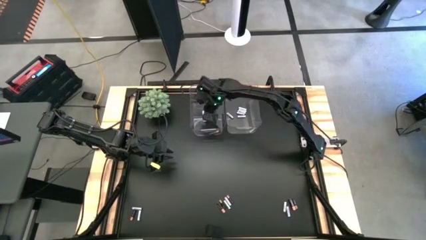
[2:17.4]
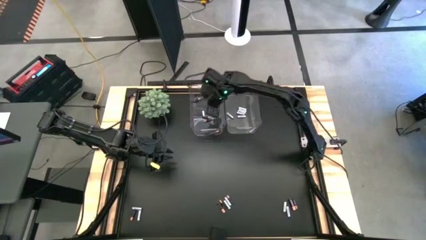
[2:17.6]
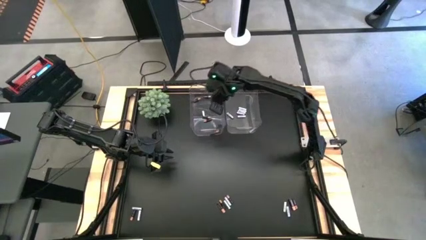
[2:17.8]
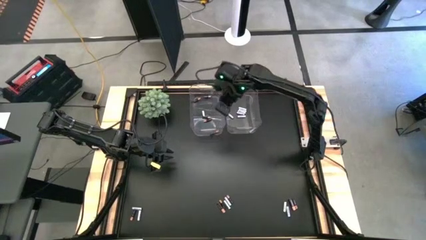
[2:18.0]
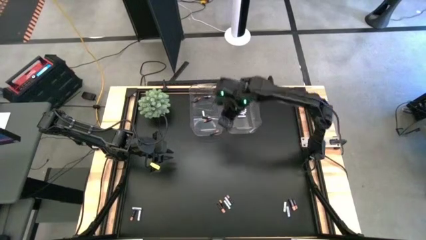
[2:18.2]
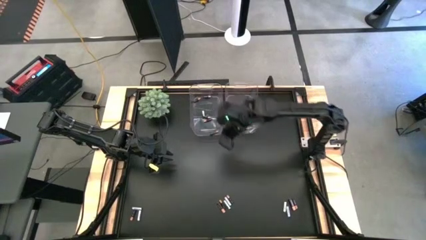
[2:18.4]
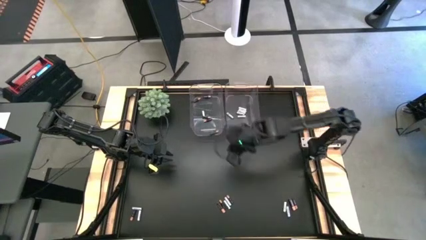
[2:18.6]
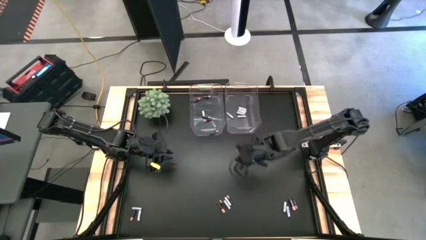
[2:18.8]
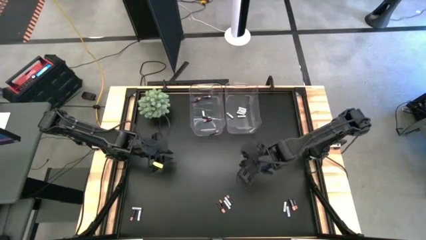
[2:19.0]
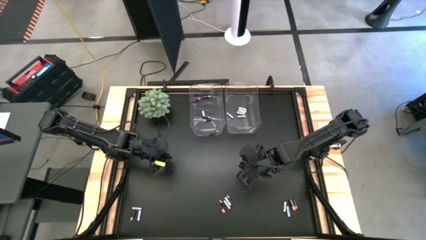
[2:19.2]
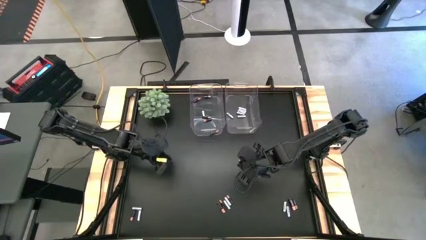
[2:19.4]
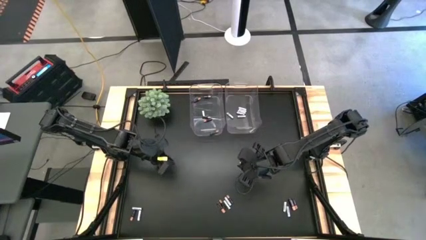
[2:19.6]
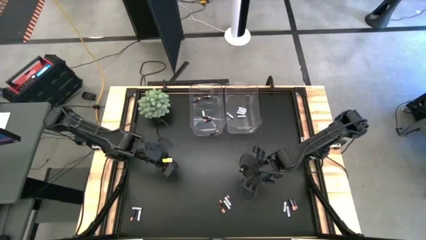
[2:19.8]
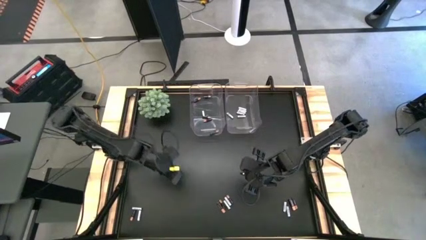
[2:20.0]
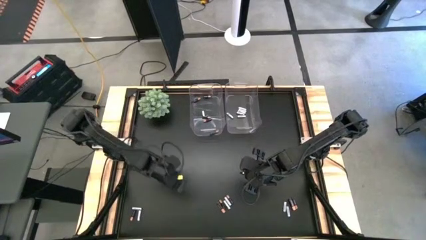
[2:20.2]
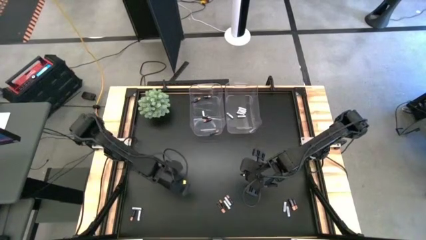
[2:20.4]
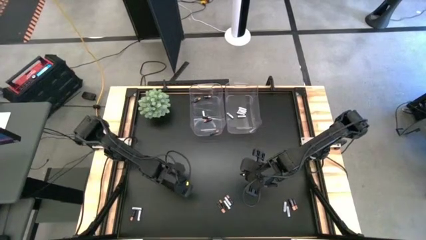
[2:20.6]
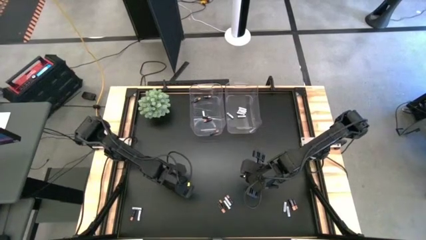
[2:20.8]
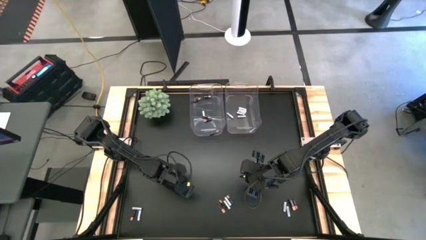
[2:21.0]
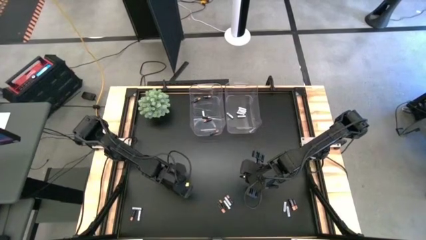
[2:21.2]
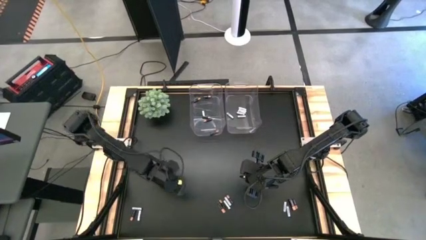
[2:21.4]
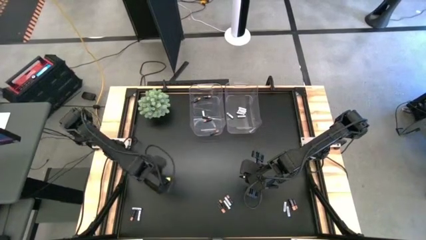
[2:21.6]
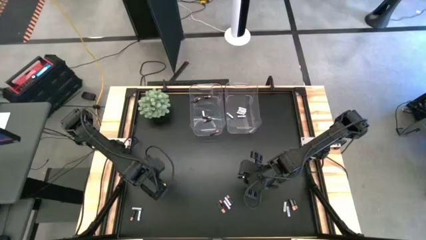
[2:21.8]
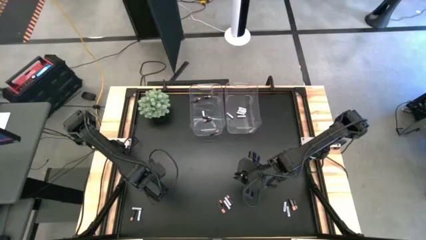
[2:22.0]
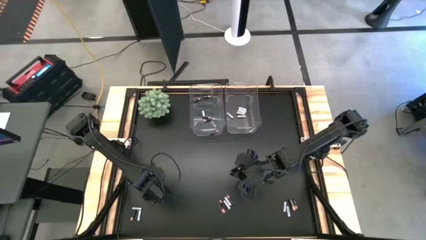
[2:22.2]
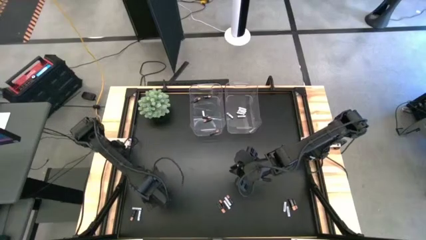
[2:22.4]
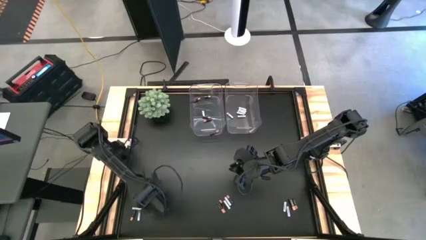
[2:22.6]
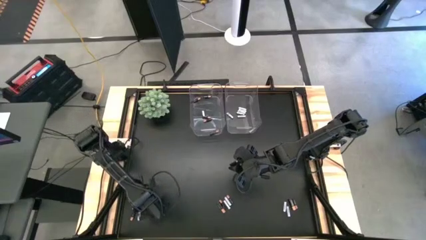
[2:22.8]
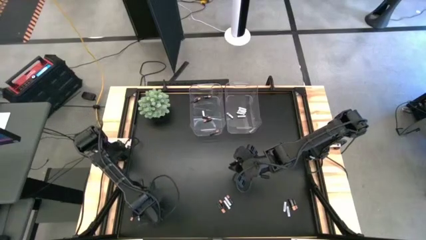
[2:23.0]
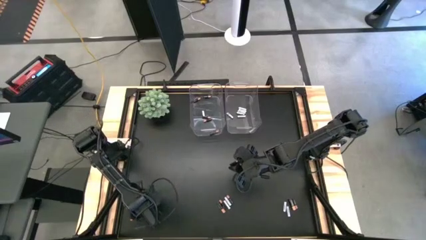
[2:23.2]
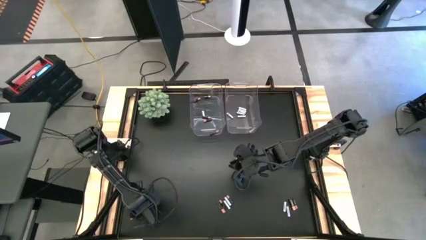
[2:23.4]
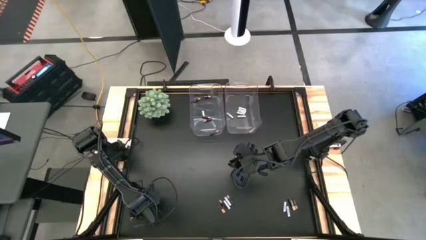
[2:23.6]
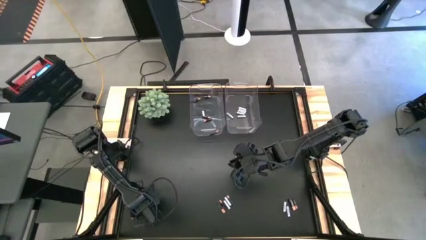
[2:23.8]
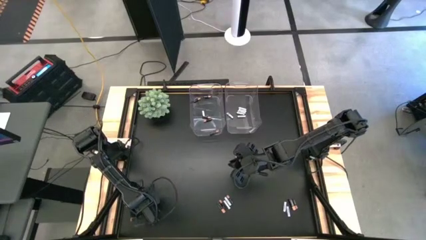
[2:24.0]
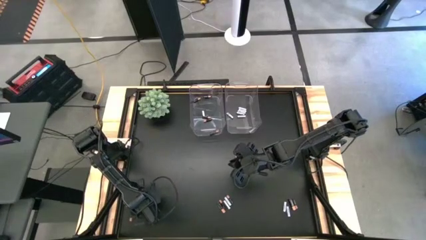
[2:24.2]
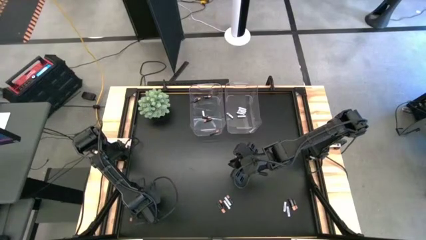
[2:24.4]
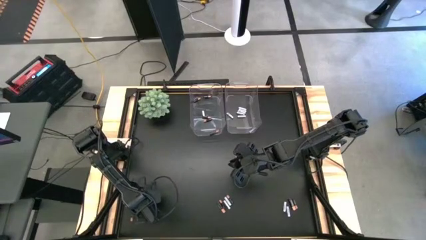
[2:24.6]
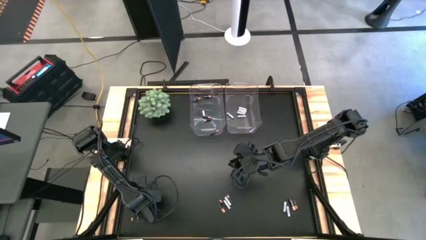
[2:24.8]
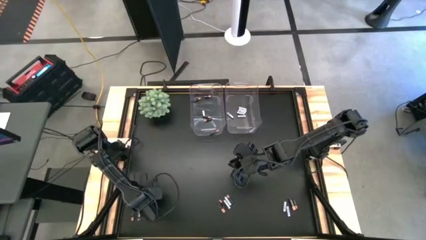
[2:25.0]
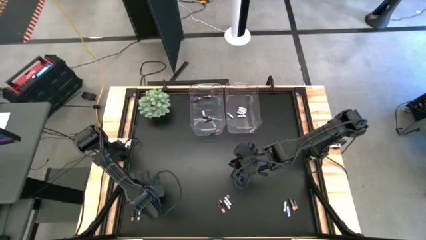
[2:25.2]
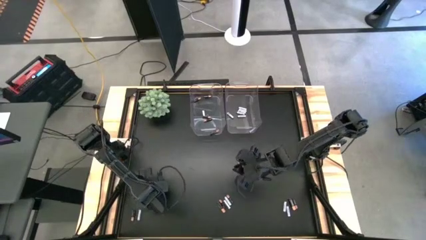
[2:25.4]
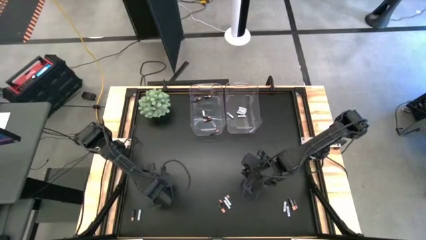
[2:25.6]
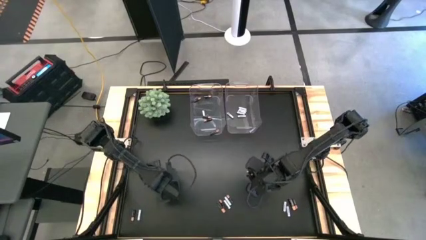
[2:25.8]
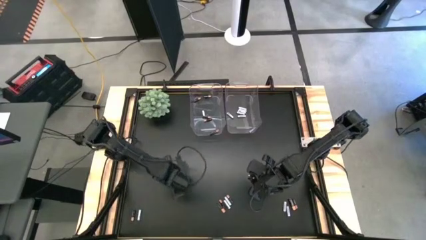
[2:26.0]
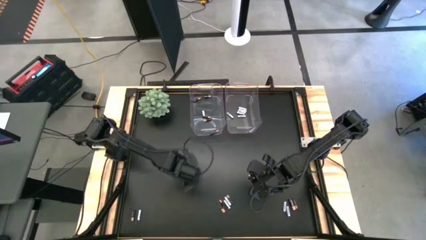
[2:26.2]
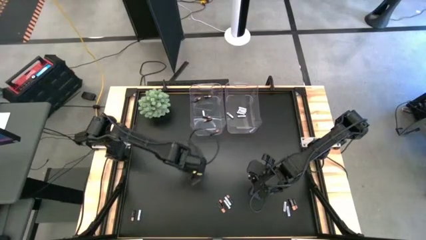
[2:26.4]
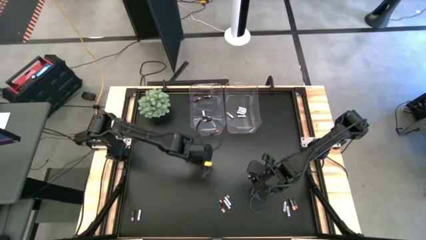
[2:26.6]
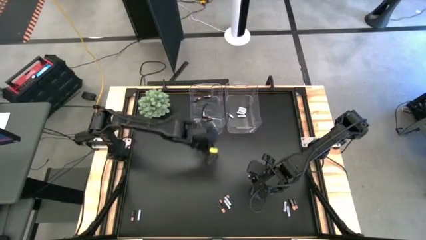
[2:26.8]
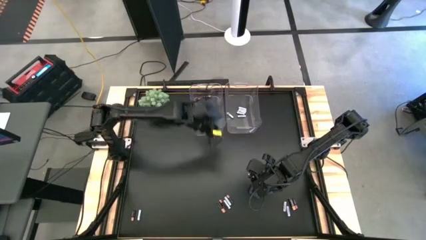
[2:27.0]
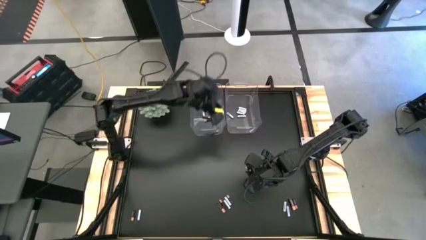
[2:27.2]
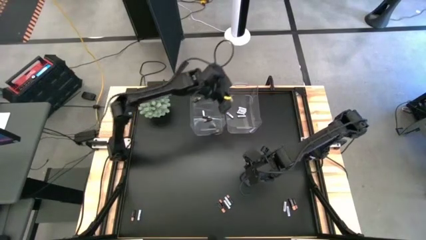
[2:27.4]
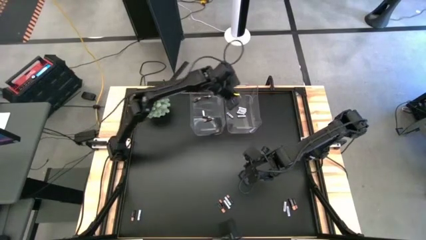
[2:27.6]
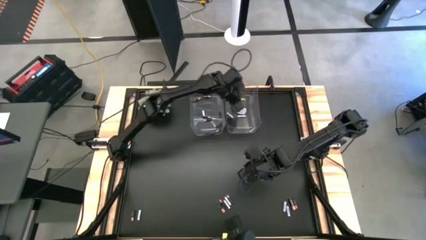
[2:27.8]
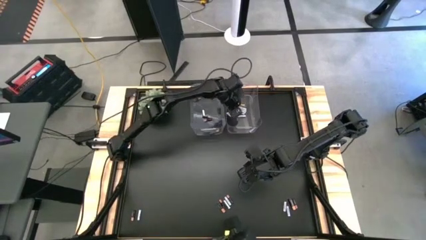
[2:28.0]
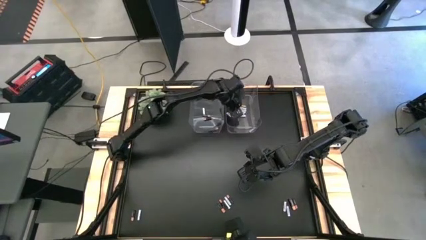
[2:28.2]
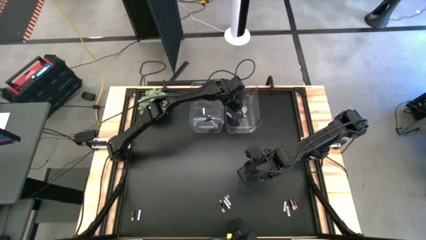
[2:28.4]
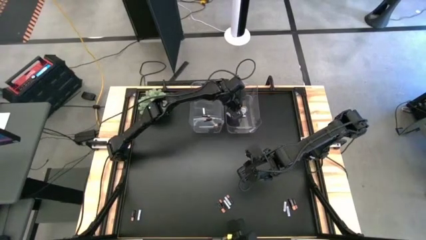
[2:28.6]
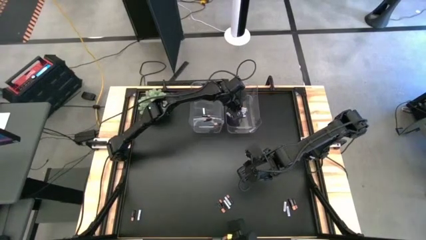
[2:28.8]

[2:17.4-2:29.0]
Task: Sort batteries
Put the white battery into the right transparent bin

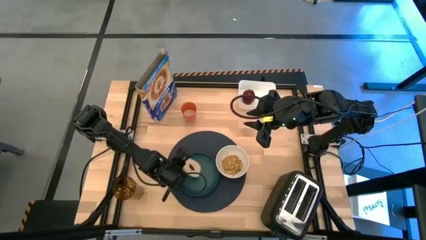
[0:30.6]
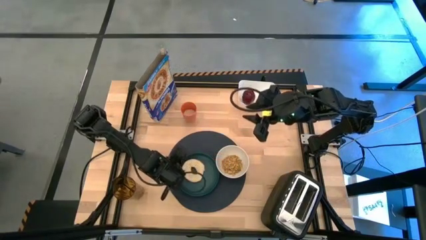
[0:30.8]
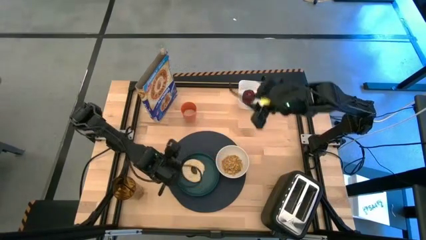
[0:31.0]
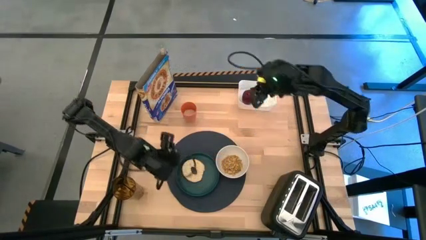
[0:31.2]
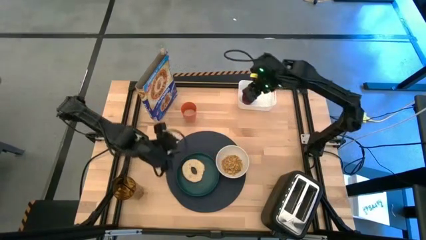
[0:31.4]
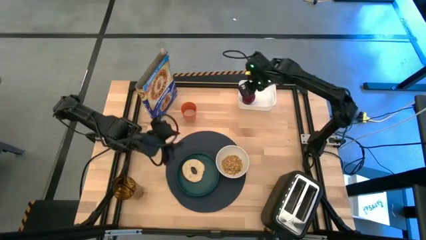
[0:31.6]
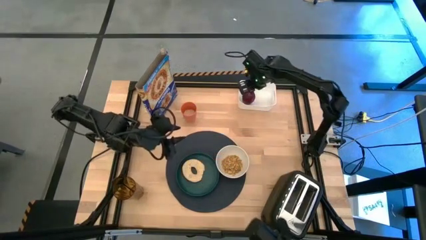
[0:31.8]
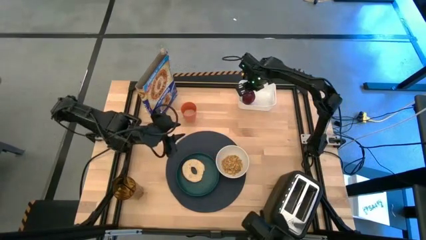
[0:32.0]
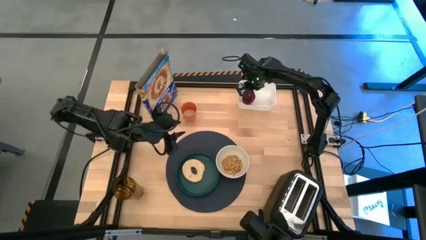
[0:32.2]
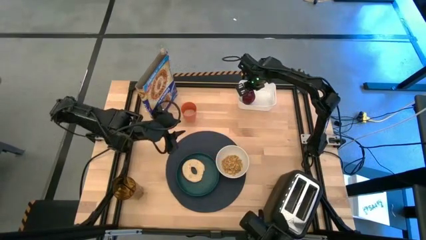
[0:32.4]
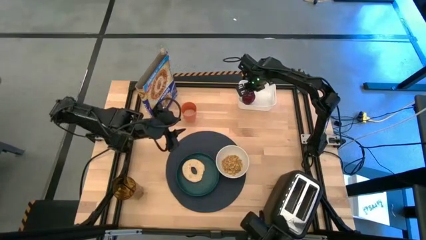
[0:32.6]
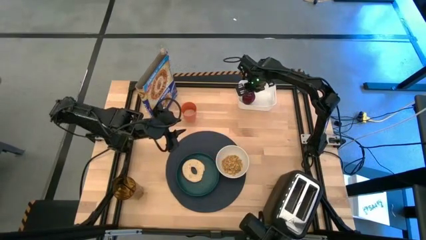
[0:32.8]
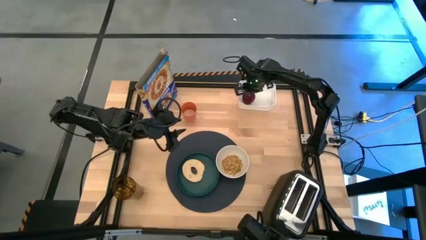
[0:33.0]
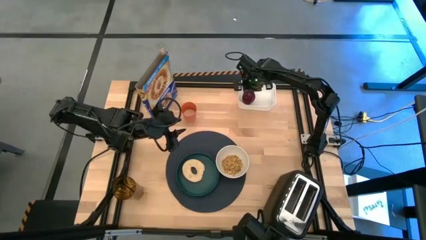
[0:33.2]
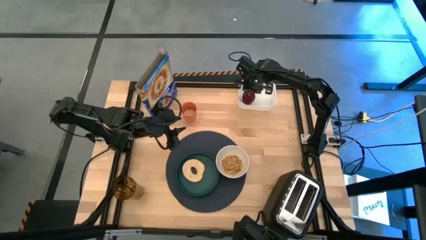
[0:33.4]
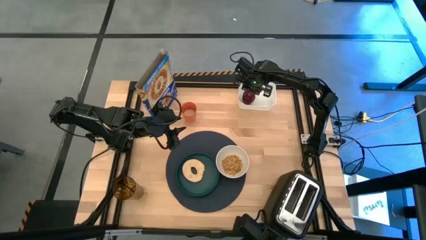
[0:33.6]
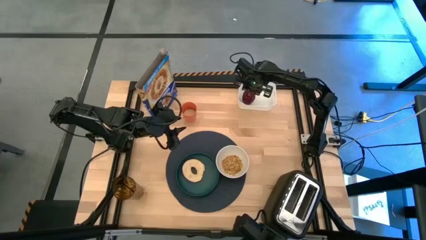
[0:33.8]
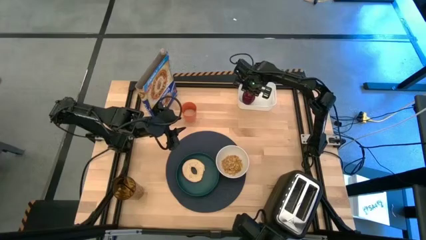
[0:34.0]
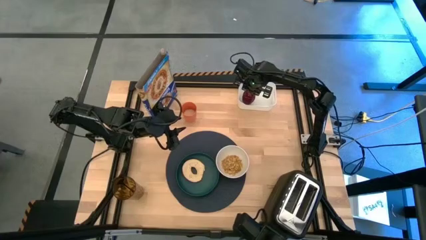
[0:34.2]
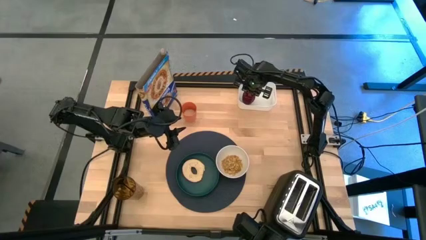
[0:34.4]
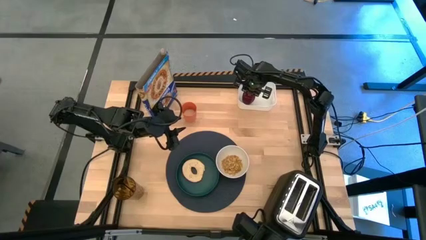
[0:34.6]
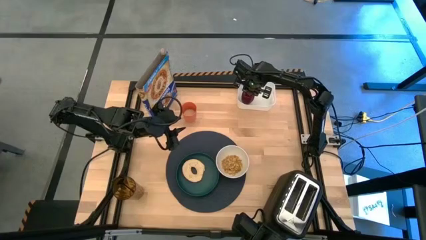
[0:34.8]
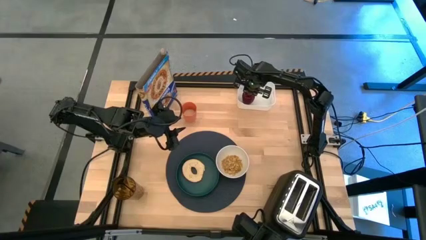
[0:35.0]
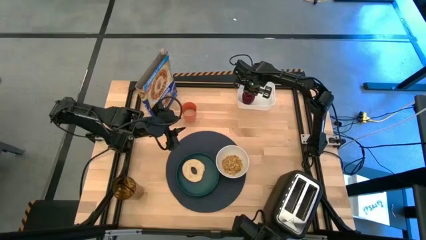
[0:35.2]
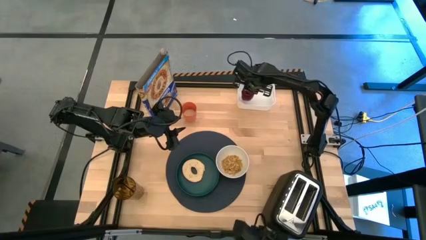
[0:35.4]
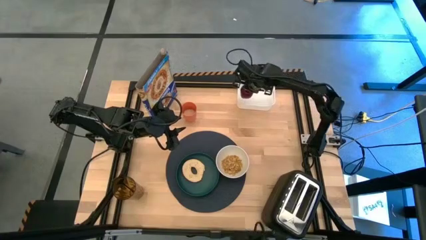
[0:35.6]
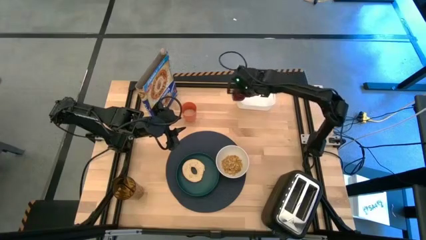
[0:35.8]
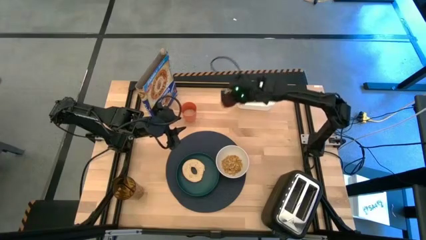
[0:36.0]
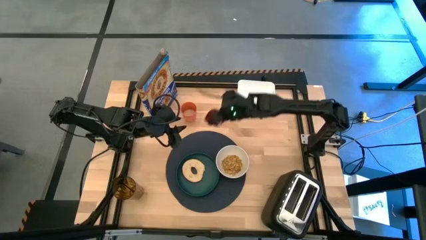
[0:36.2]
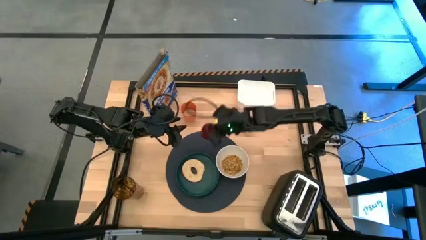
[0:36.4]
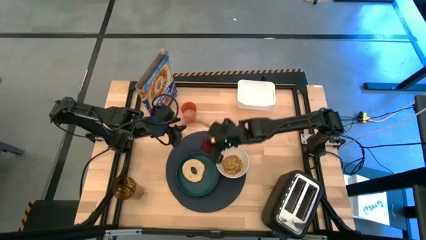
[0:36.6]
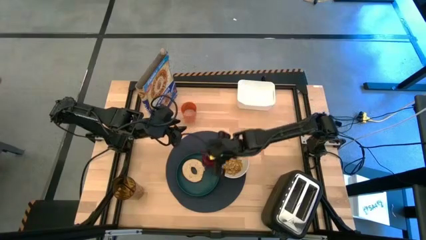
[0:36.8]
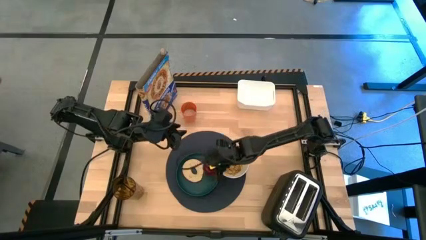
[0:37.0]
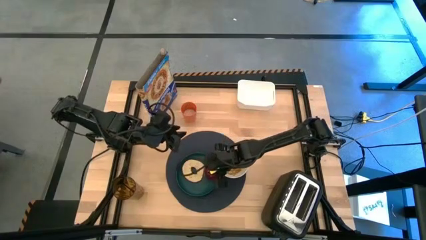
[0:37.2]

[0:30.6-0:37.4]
Task: Arrange a breakfast setting
Put the apple on the plate
